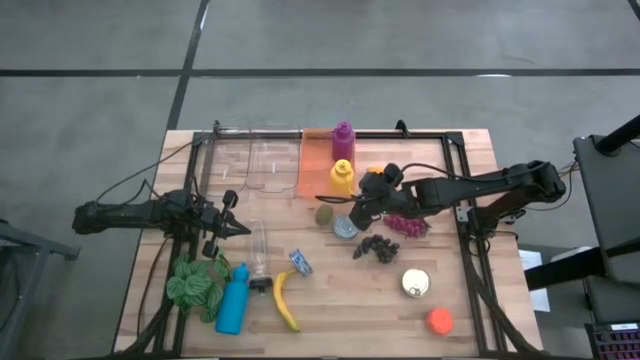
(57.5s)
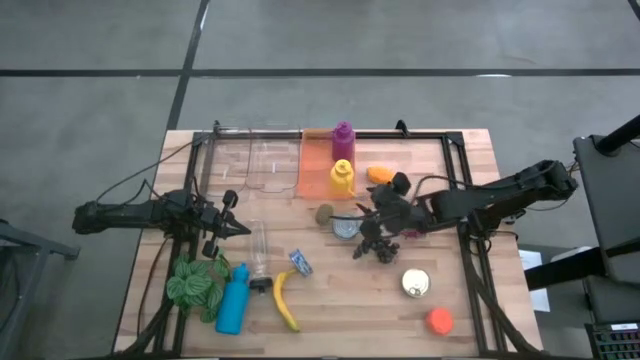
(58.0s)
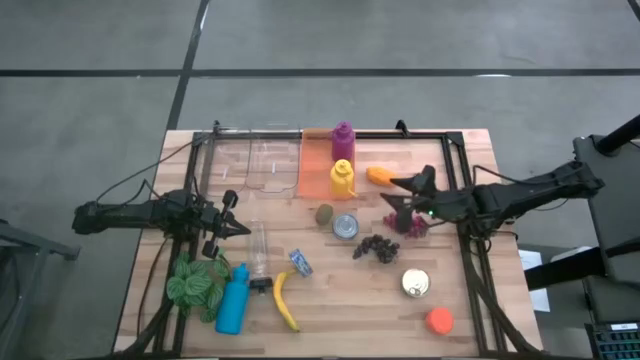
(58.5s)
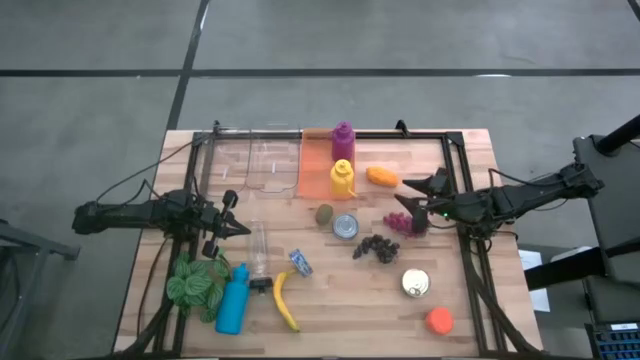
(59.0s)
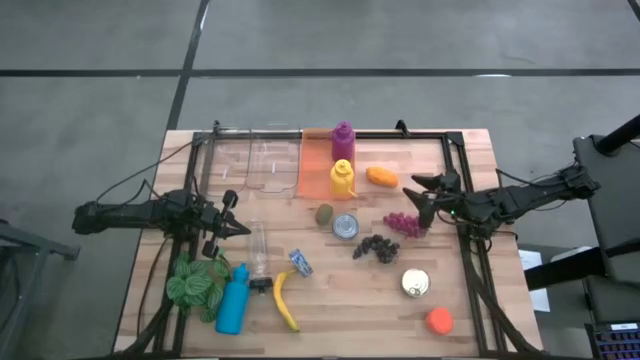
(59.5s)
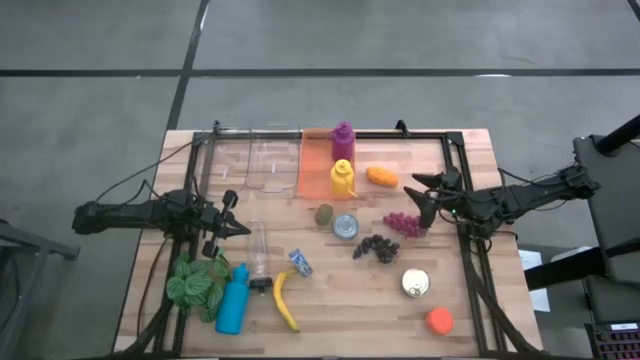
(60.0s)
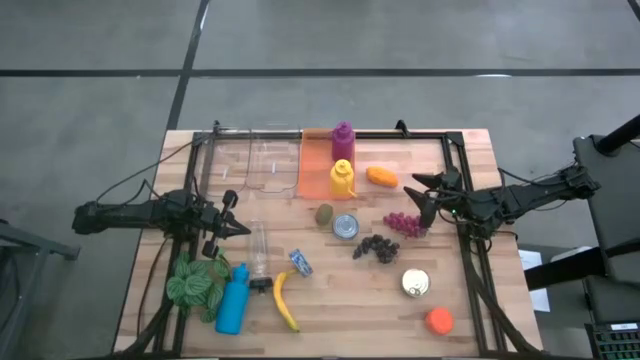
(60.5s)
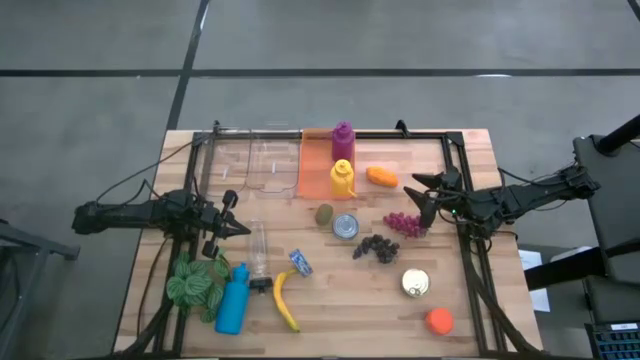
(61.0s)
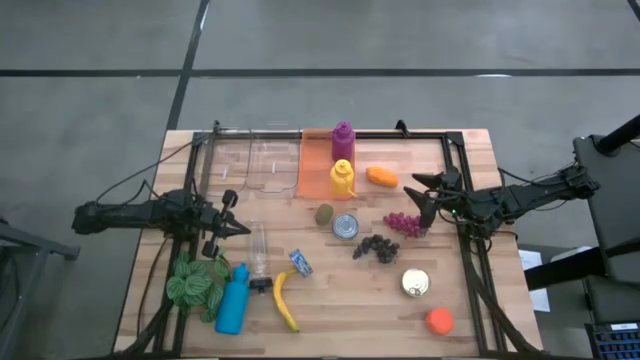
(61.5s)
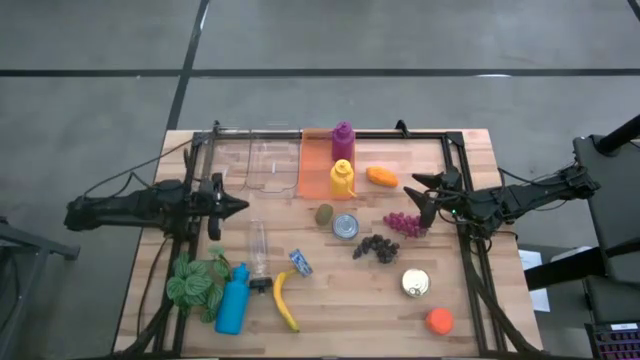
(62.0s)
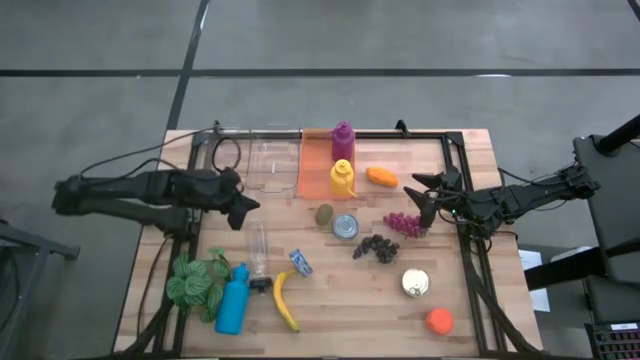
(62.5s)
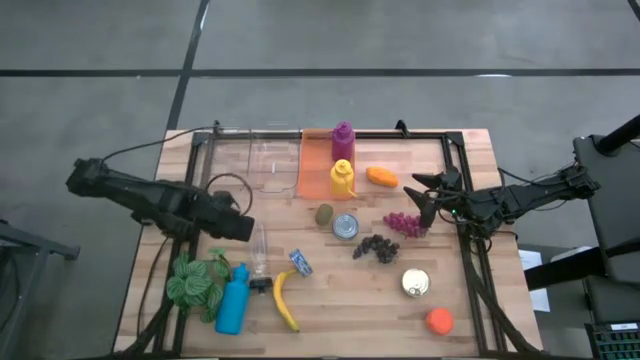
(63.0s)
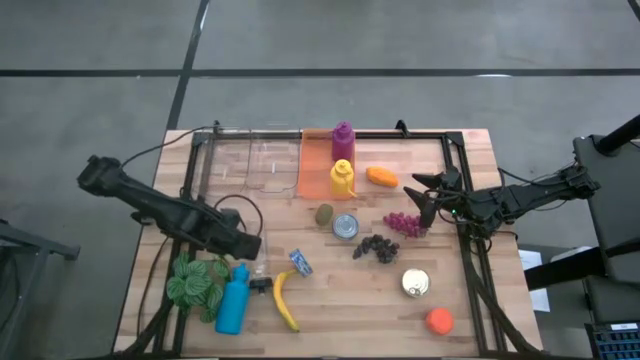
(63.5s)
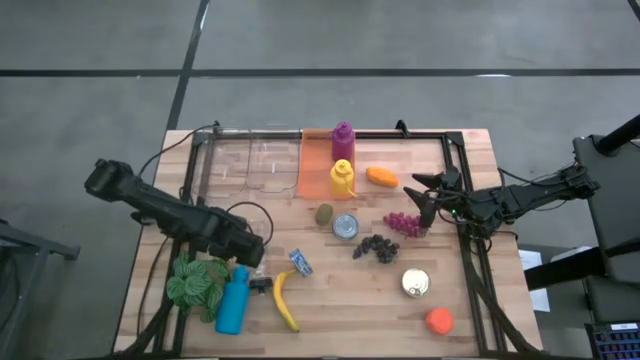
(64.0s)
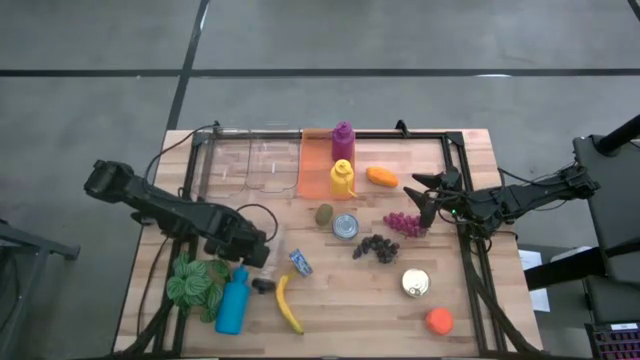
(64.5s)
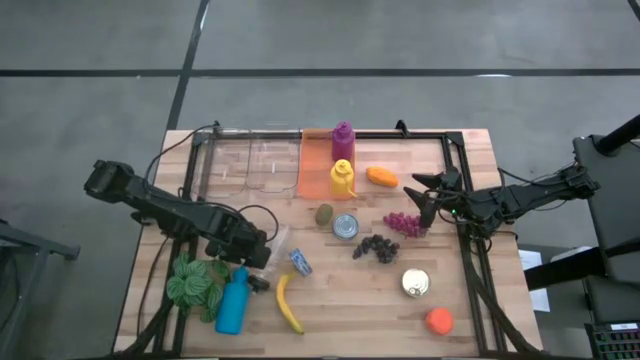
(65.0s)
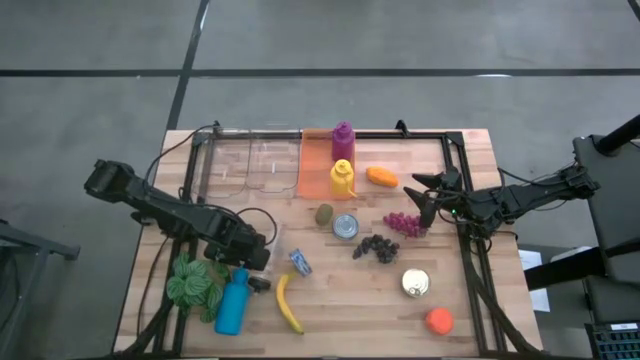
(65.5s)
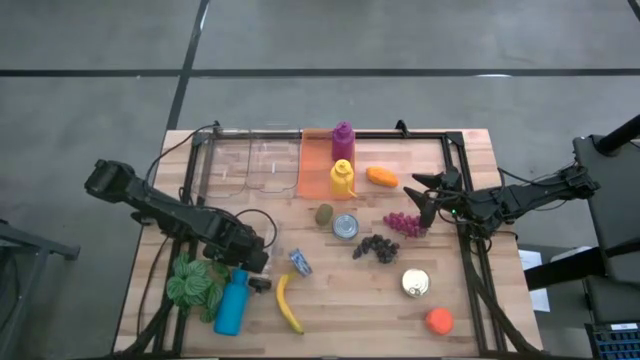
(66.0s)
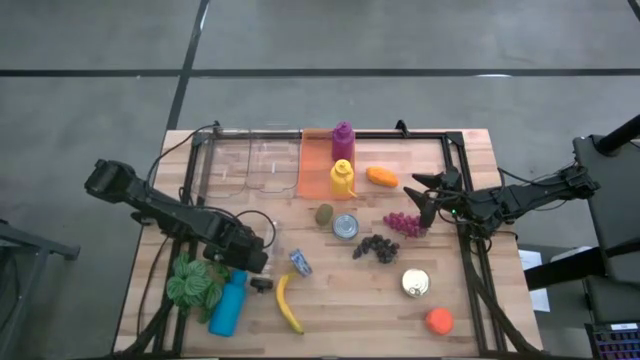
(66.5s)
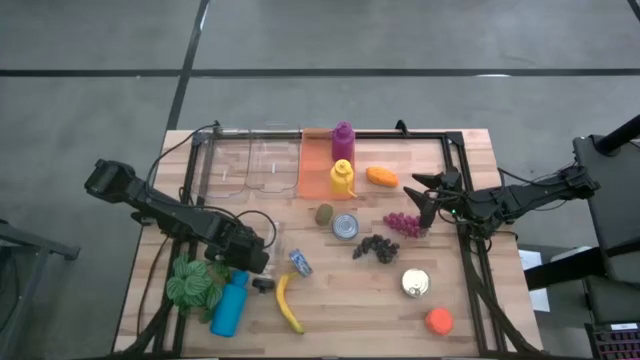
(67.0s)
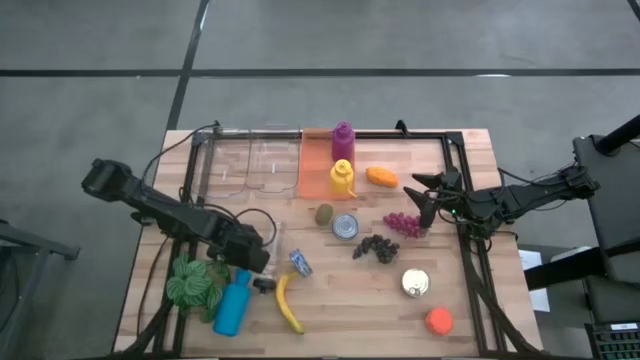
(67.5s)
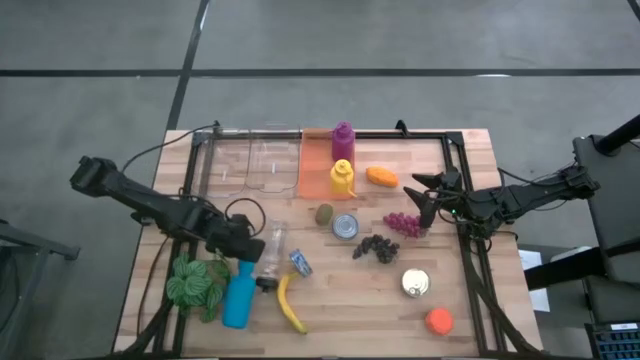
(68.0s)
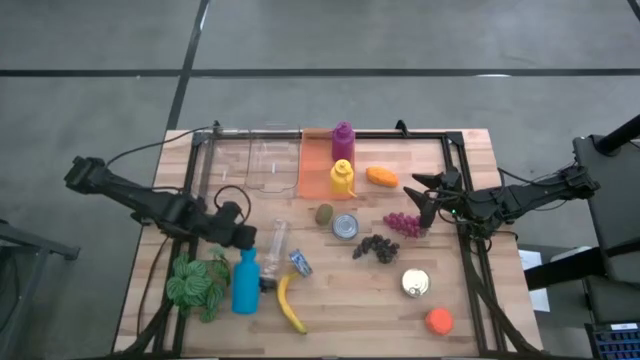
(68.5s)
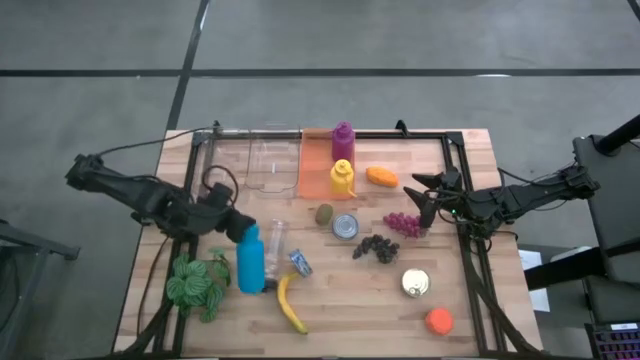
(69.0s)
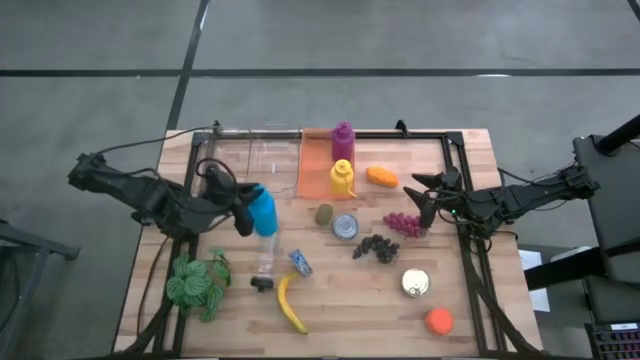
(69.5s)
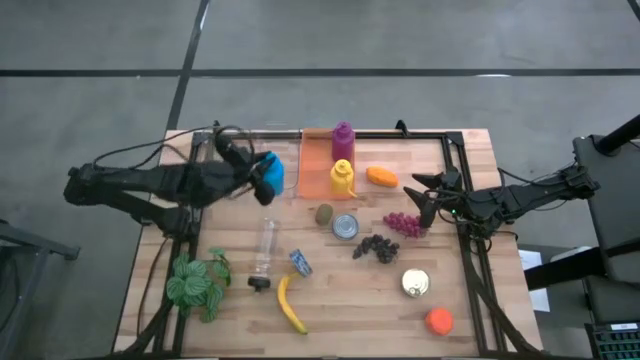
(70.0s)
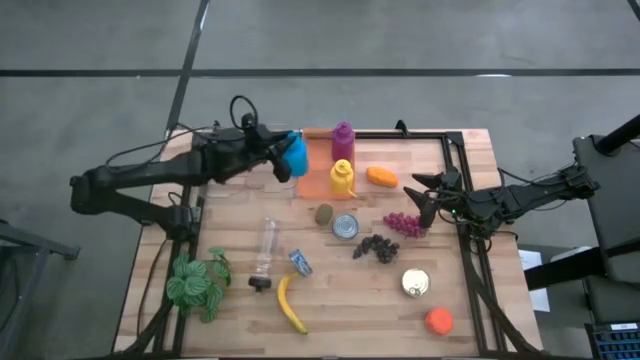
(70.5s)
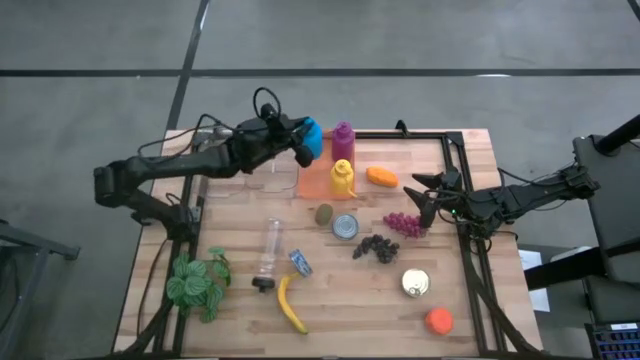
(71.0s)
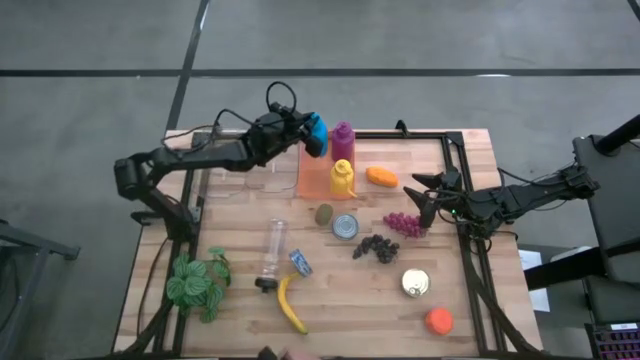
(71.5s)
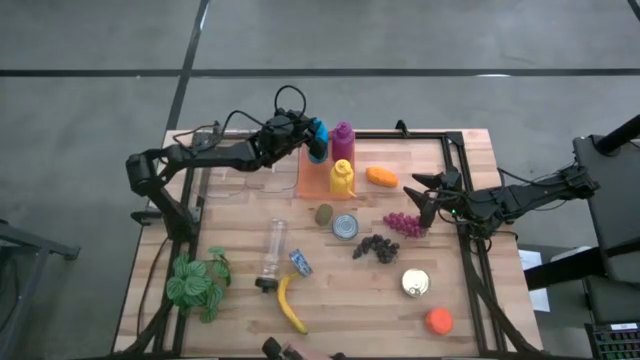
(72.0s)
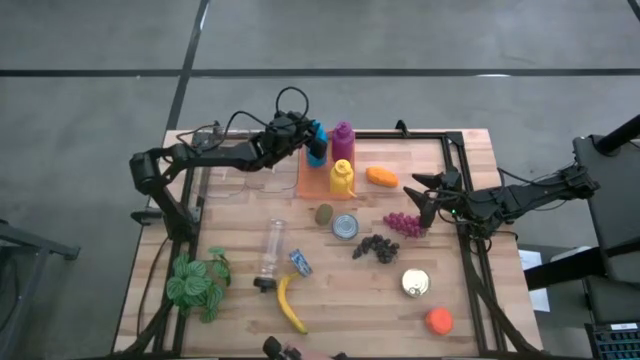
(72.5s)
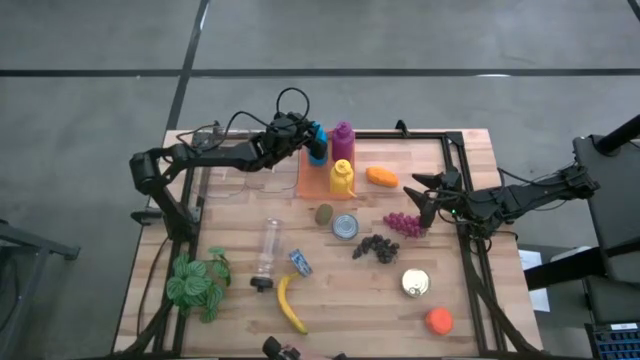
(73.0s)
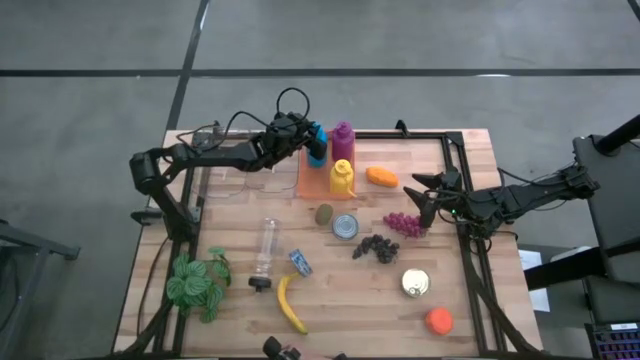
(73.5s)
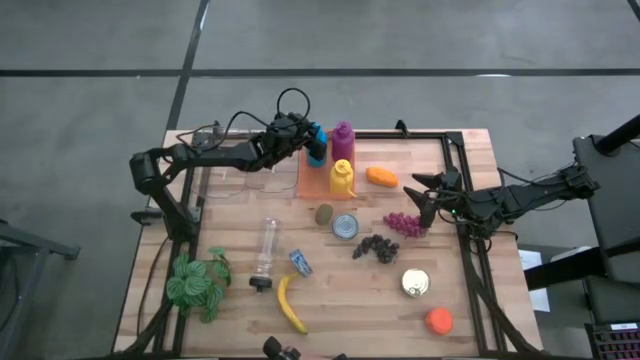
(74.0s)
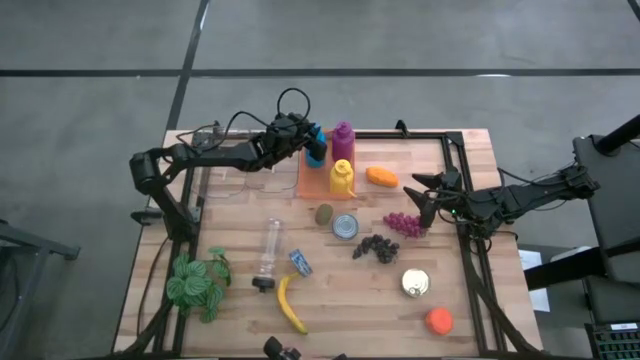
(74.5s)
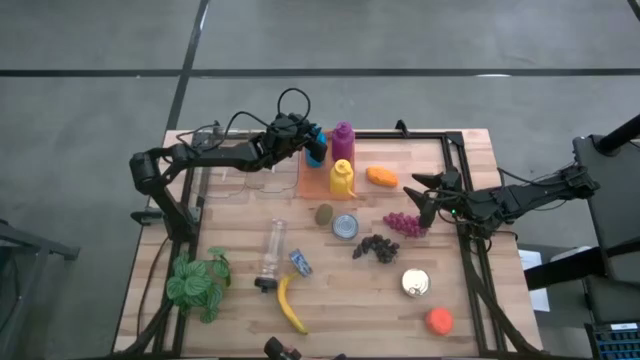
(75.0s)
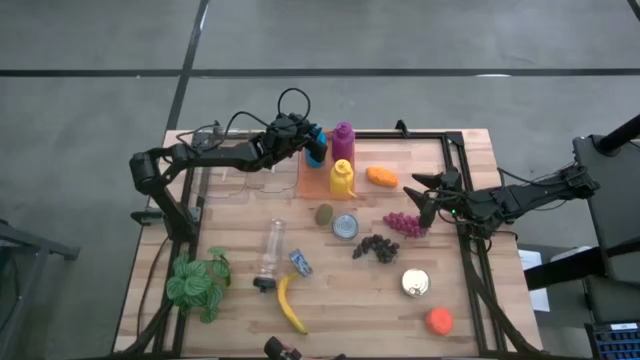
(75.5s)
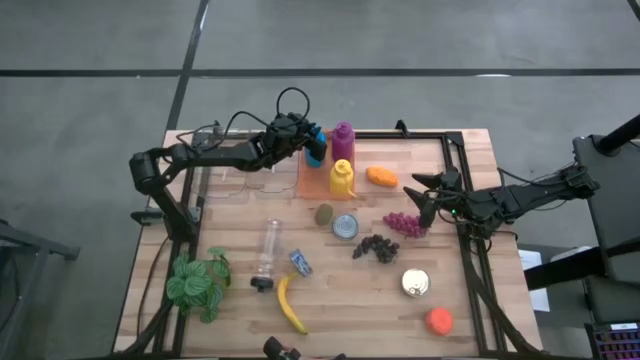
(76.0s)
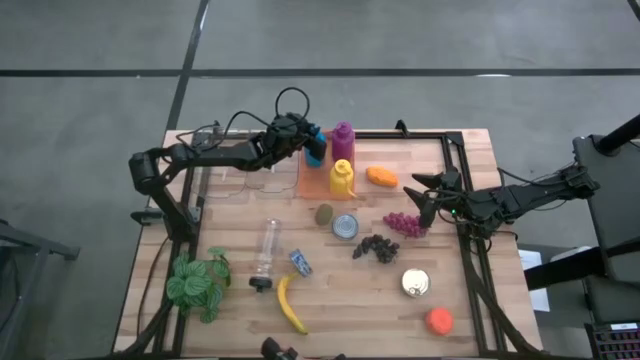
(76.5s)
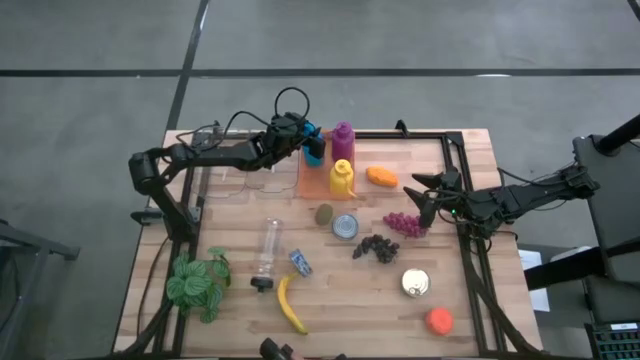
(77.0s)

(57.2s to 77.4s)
Task: Pick & Place Food Item
Put the blue tumbler into the orange bin
